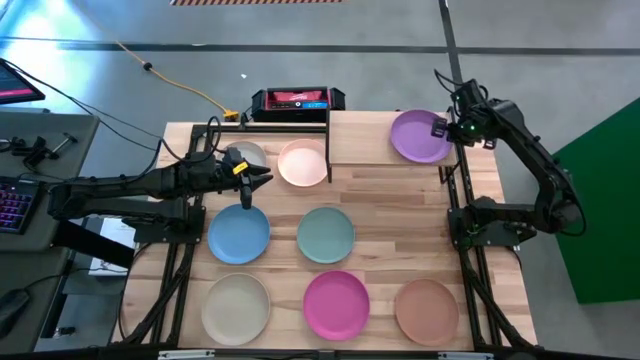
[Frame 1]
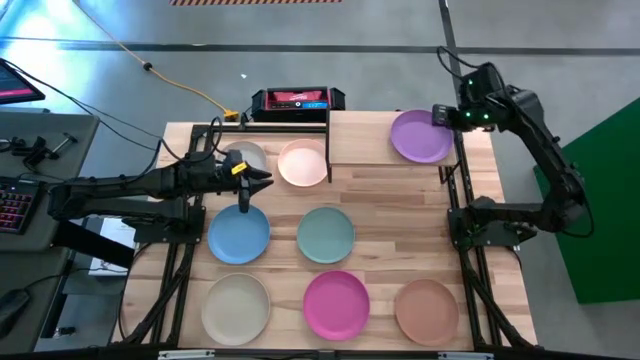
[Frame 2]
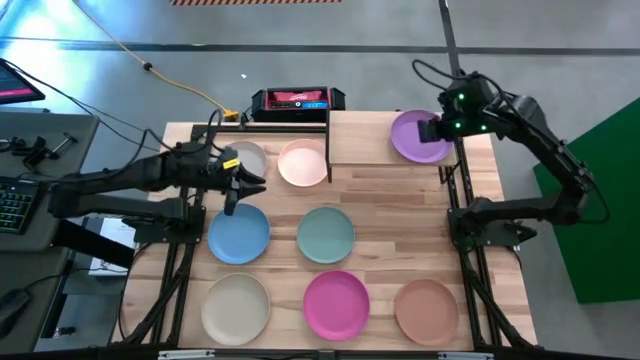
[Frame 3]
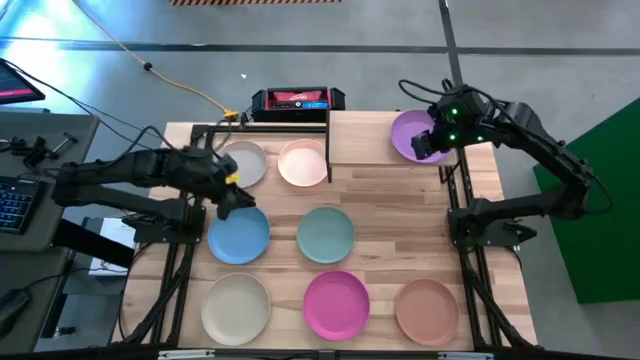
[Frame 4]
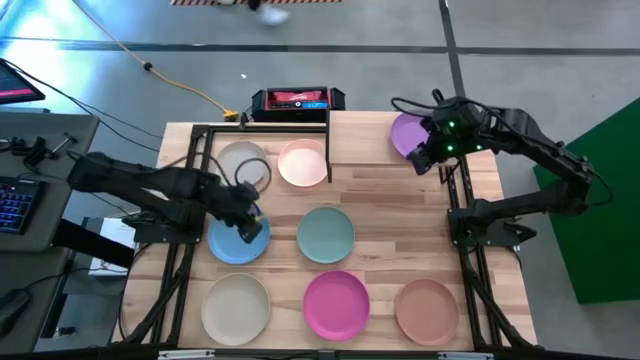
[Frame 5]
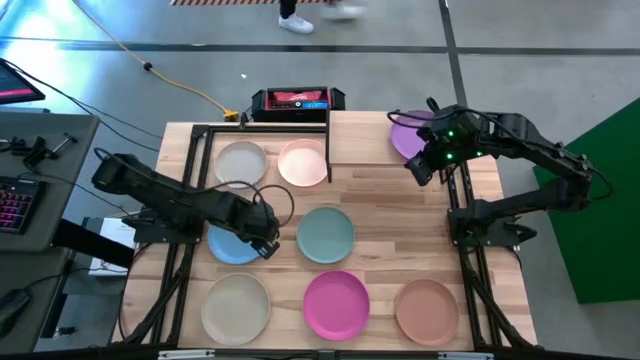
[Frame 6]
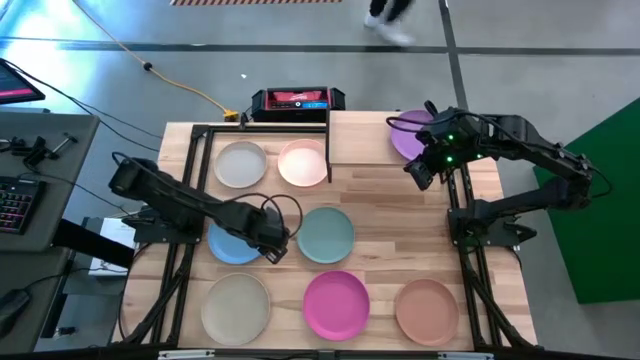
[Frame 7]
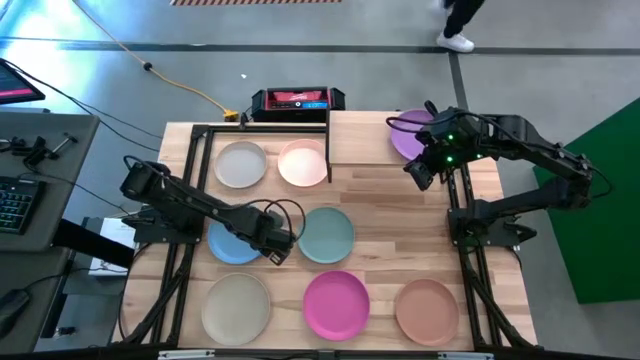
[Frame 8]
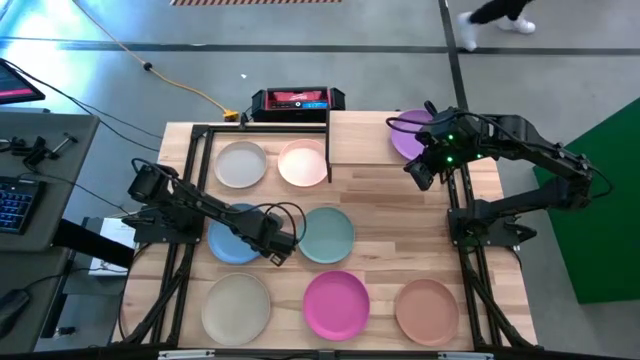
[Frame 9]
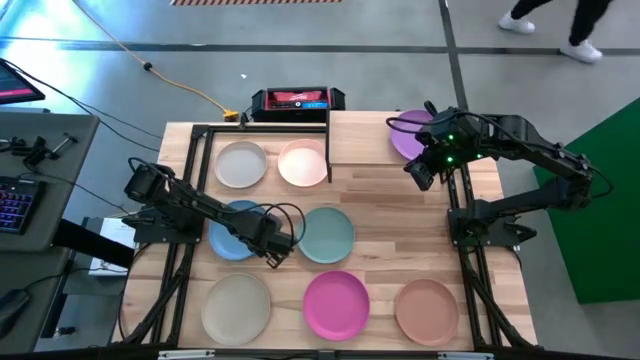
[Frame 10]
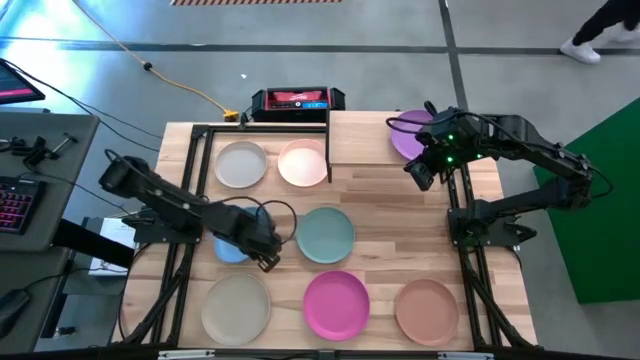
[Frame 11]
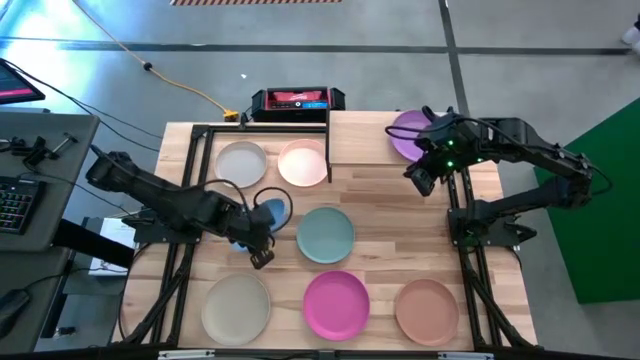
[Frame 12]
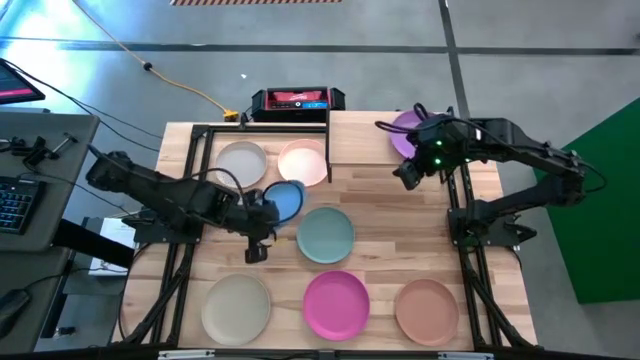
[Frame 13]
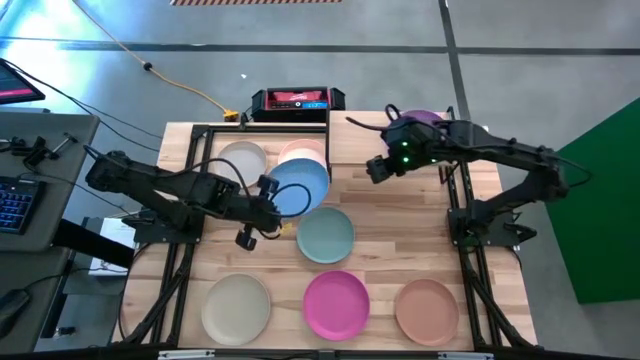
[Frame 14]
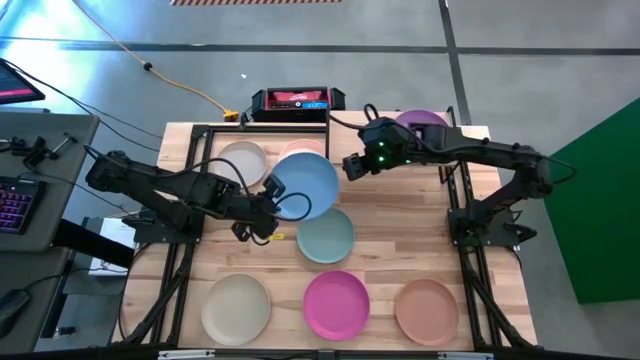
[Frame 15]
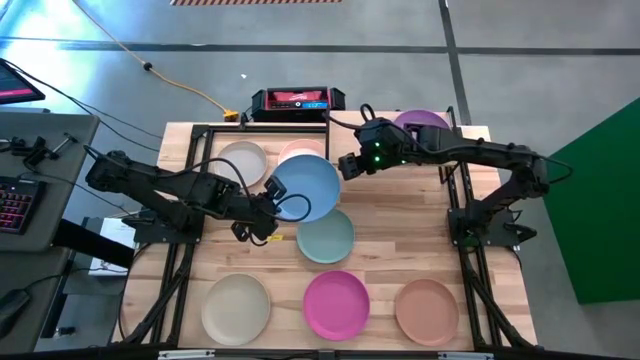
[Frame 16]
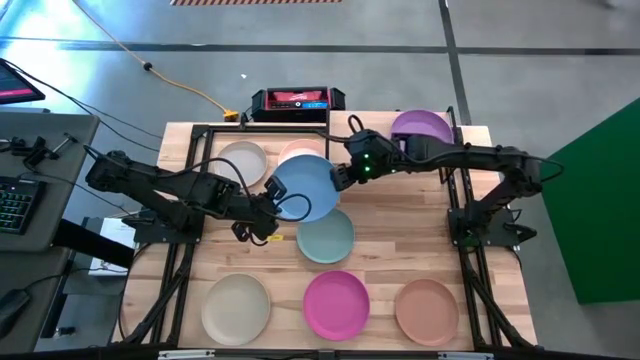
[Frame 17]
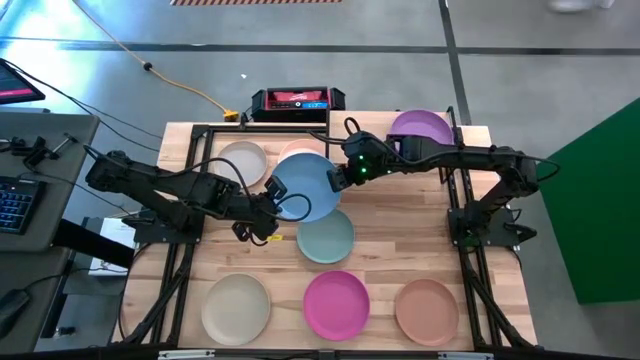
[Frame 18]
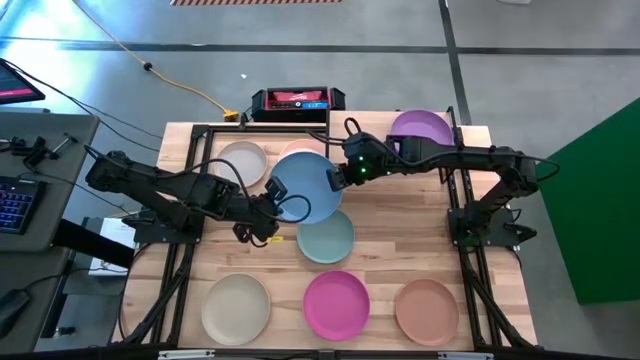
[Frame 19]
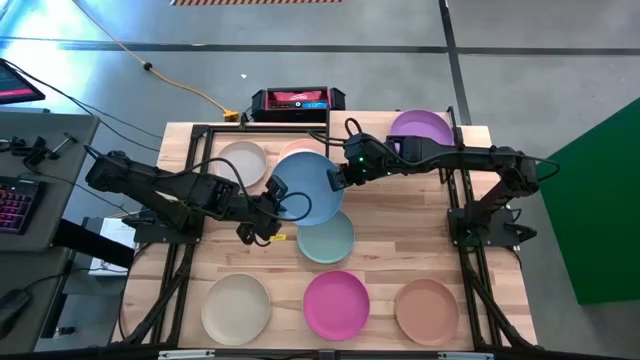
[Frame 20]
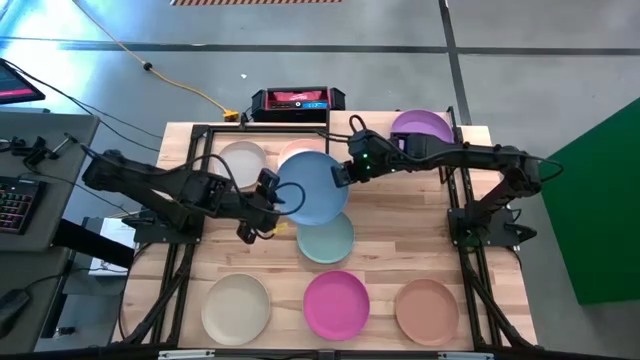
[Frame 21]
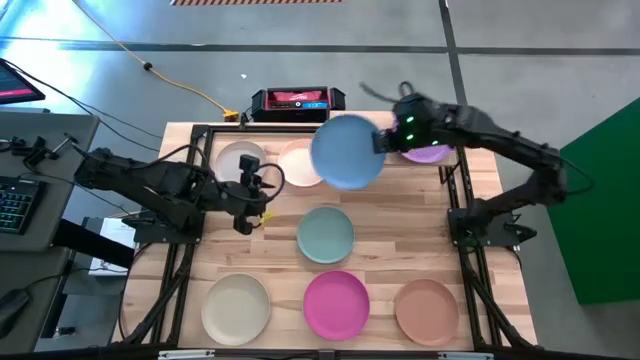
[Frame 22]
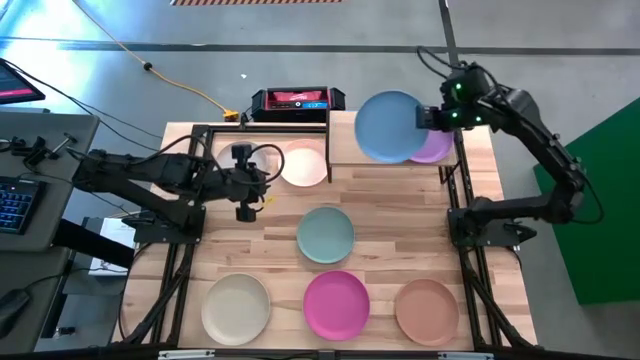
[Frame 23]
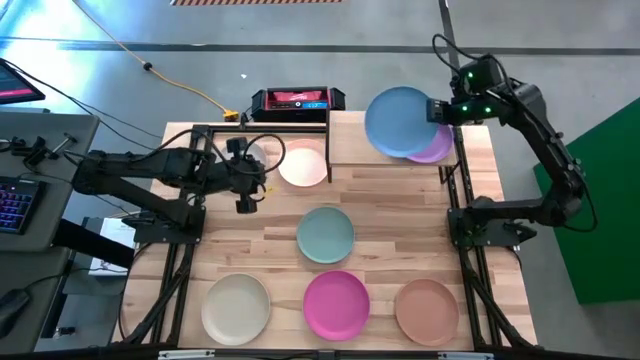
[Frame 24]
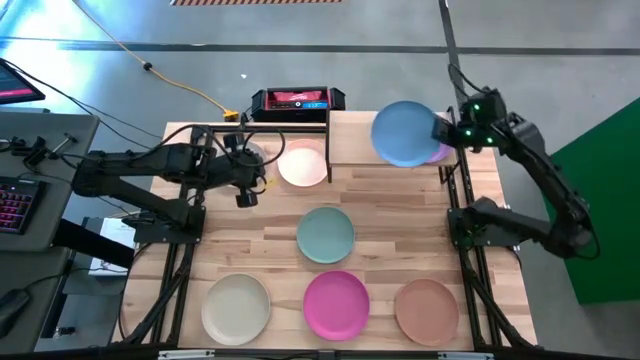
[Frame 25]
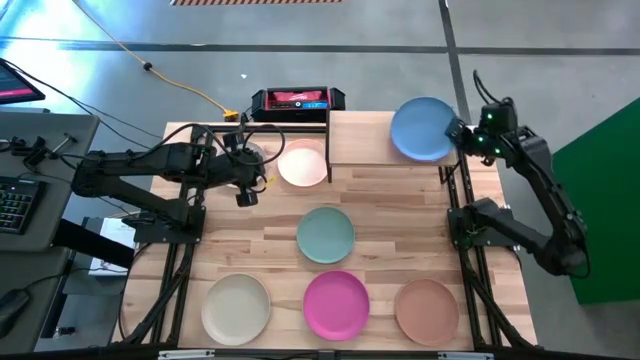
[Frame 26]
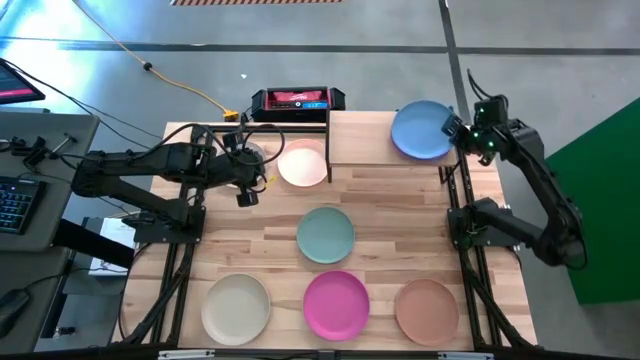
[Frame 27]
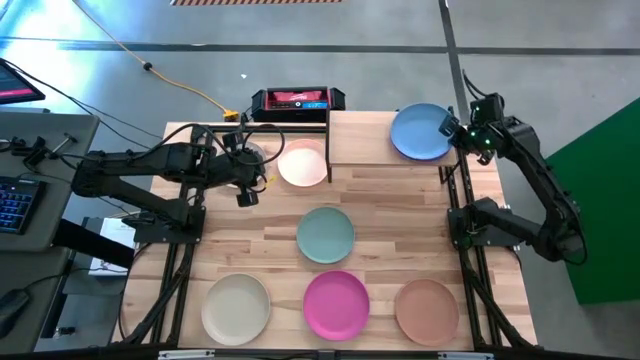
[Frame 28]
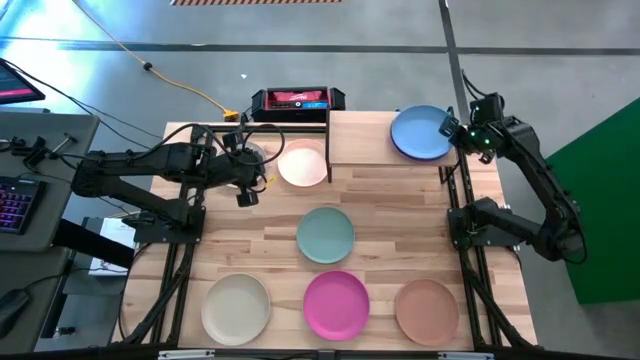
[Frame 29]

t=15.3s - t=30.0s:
Task: Place and stack plates onto a shelf
Stack the blue plate on top of the purple plate on the shelf

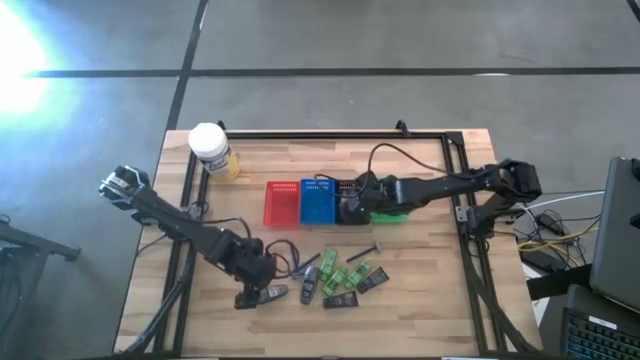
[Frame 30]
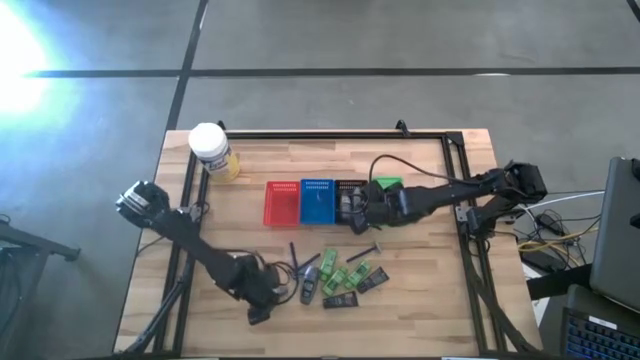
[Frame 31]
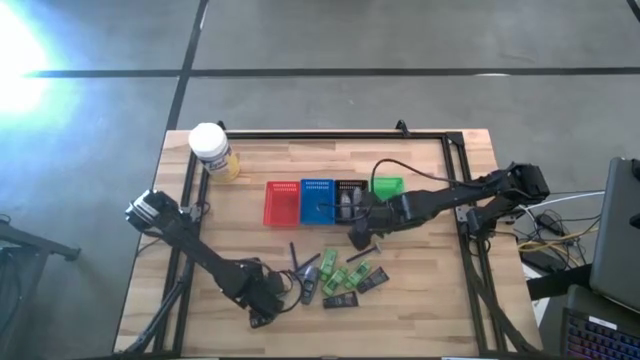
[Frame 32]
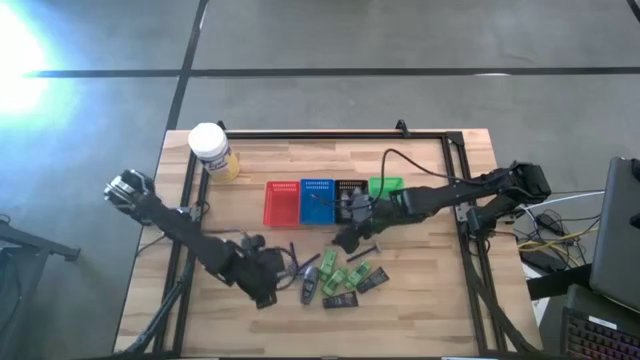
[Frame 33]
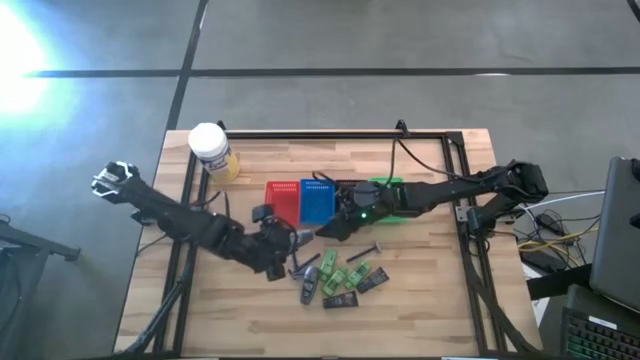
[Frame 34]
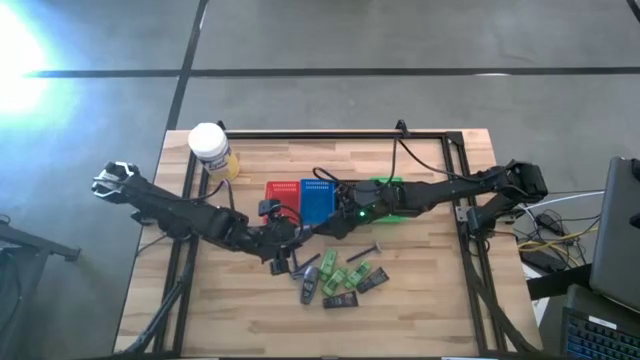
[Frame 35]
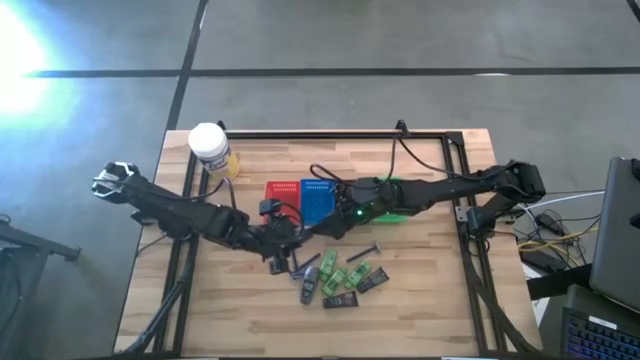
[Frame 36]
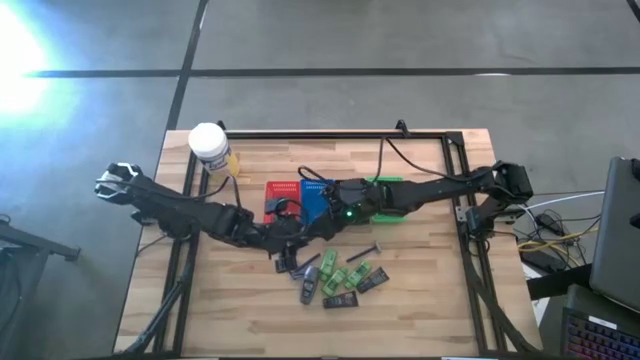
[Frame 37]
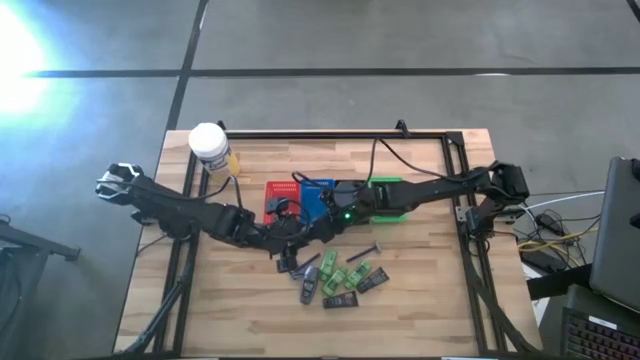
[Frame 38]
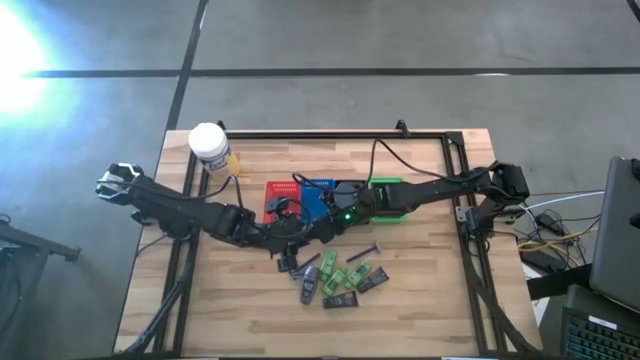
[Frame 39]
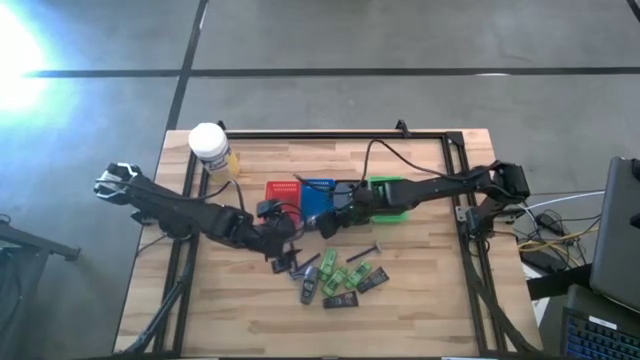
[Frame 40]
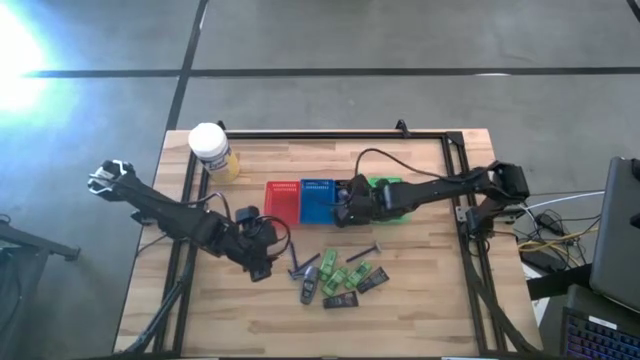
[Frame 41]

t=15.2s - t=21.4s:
Task: Pick & Place Travel size toiletries
Put the gray deodorant into the black bin

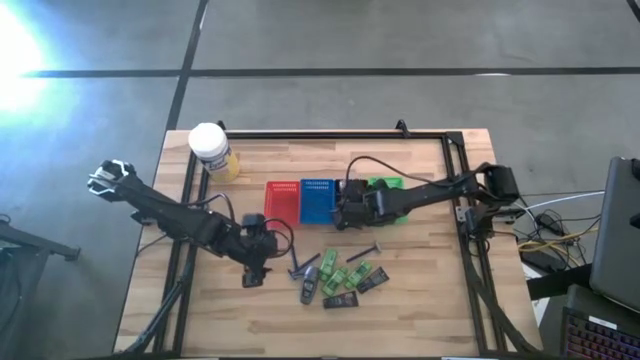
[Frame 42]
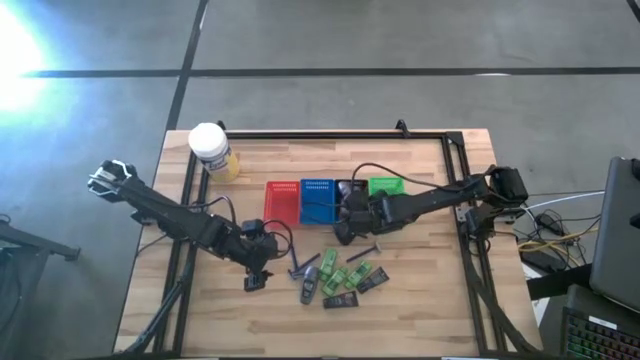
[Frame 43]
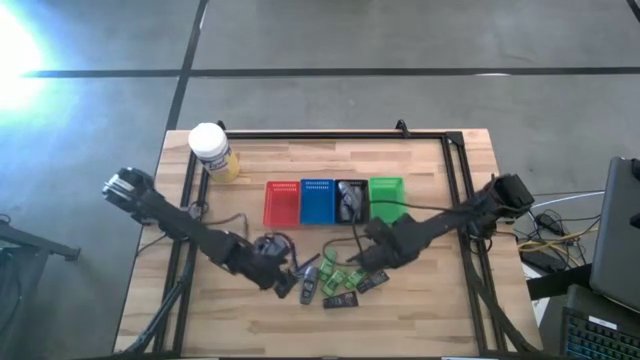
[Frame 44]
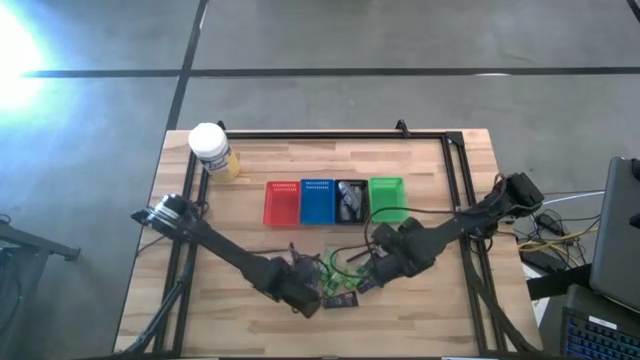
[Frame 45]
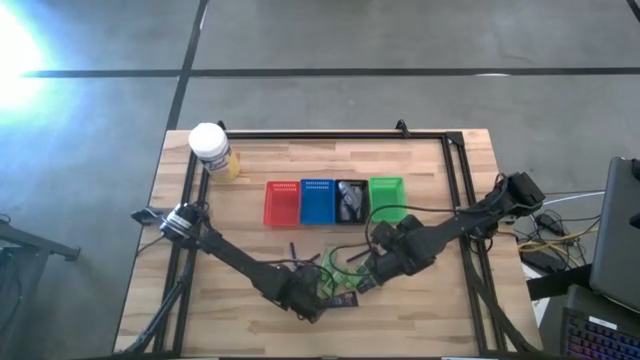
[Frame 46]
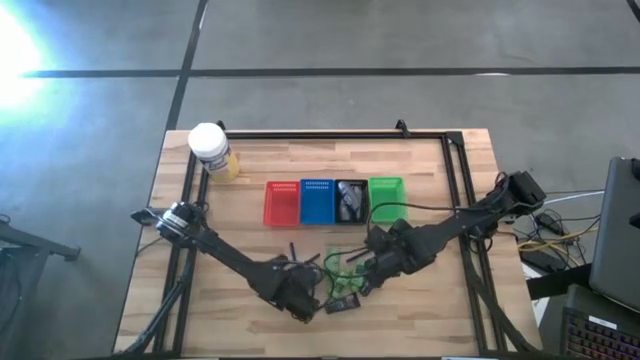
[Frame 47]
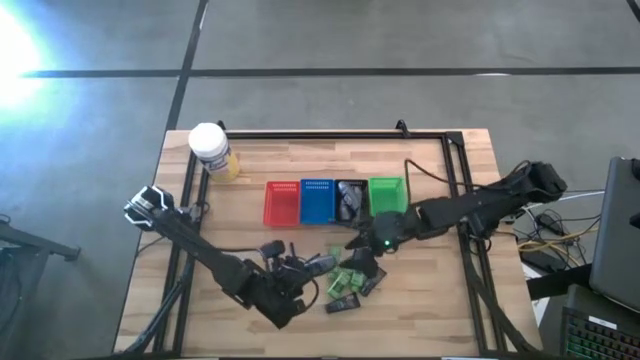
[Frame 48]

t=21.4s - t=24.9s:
Put the gray deodorant into the black bin
